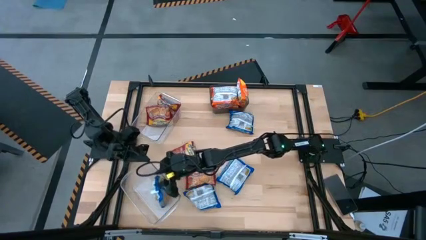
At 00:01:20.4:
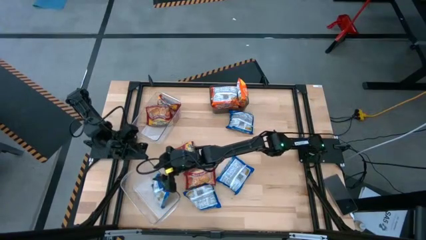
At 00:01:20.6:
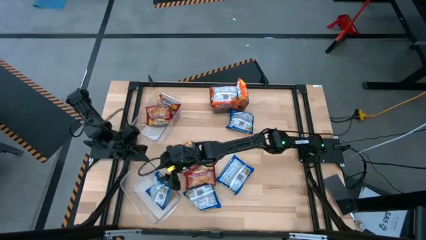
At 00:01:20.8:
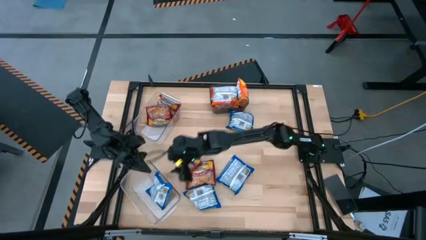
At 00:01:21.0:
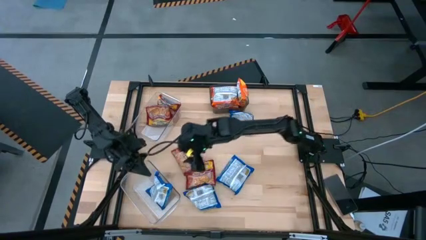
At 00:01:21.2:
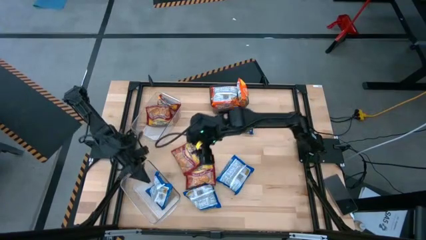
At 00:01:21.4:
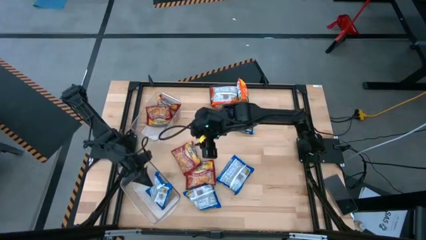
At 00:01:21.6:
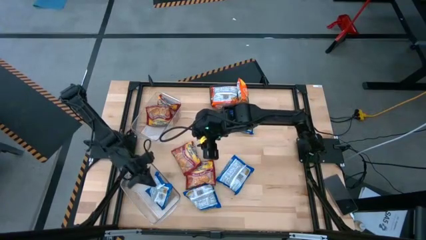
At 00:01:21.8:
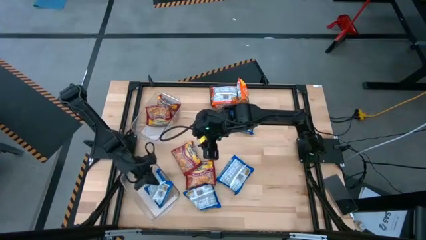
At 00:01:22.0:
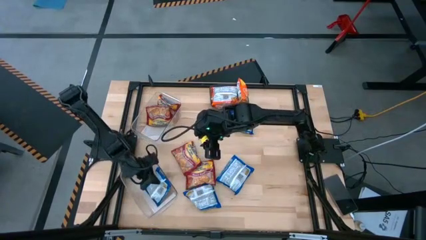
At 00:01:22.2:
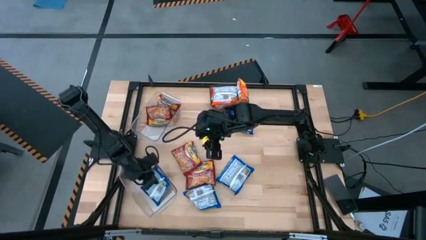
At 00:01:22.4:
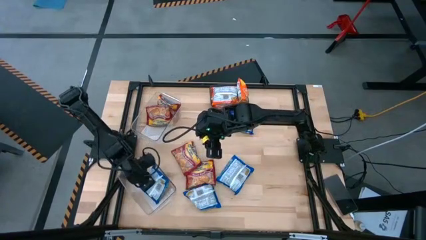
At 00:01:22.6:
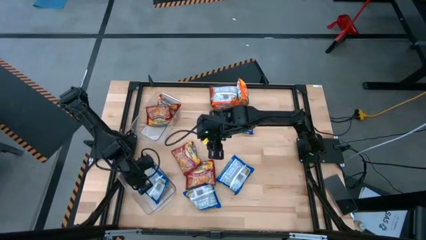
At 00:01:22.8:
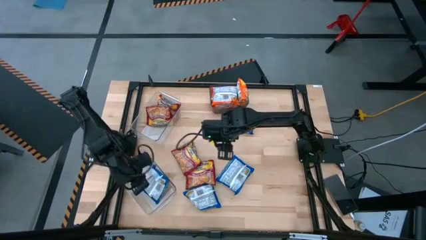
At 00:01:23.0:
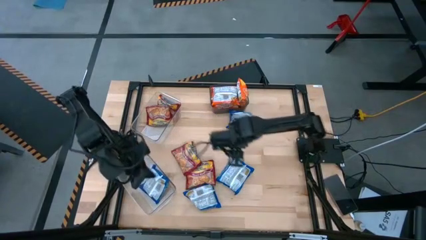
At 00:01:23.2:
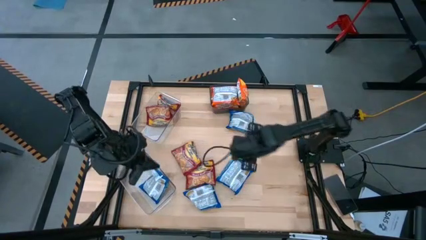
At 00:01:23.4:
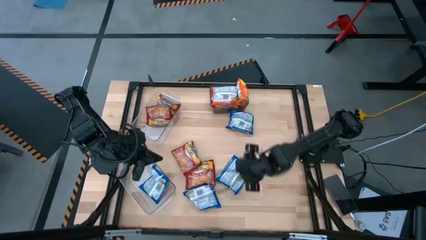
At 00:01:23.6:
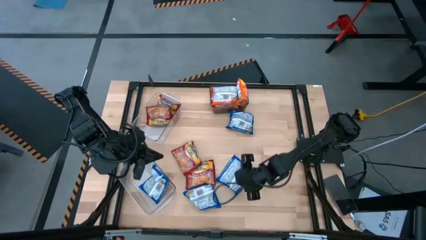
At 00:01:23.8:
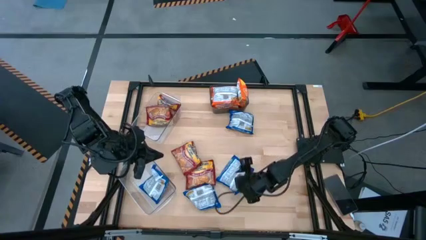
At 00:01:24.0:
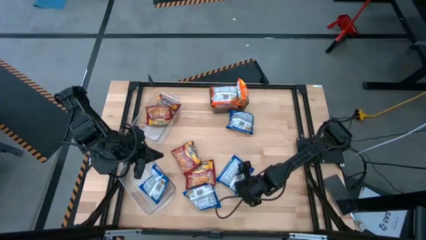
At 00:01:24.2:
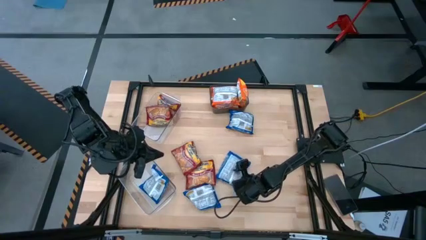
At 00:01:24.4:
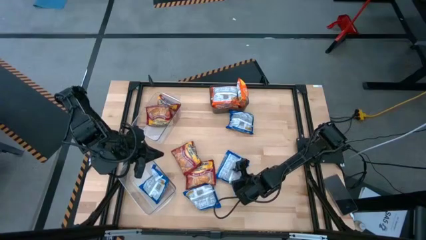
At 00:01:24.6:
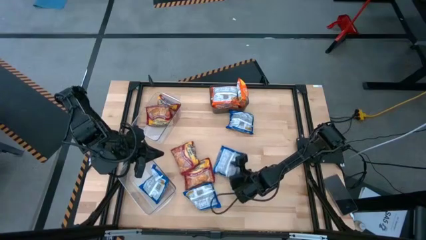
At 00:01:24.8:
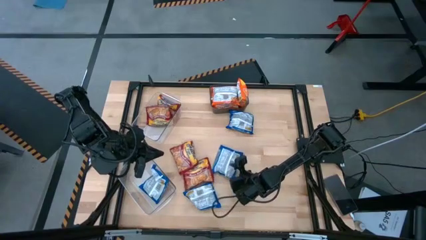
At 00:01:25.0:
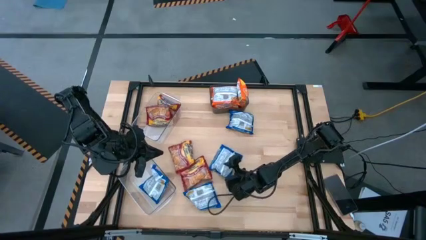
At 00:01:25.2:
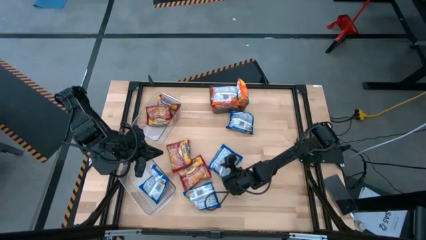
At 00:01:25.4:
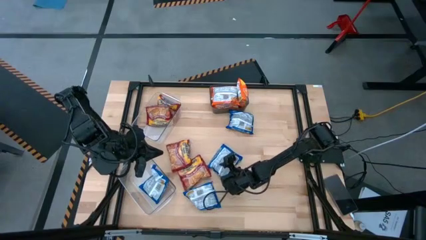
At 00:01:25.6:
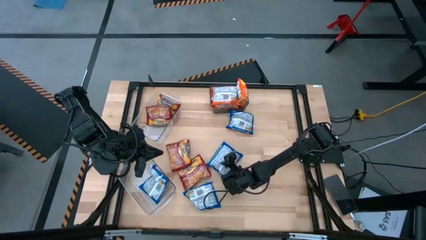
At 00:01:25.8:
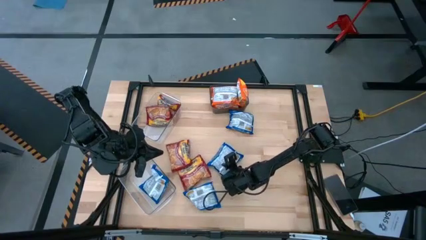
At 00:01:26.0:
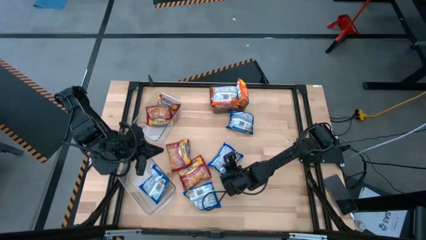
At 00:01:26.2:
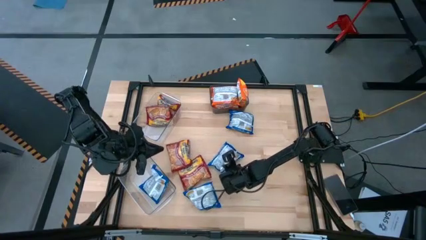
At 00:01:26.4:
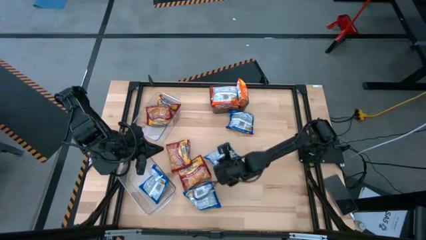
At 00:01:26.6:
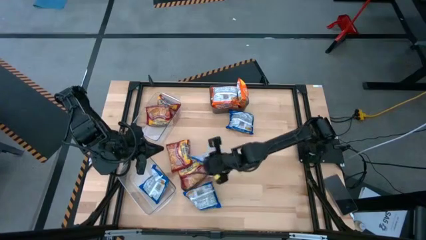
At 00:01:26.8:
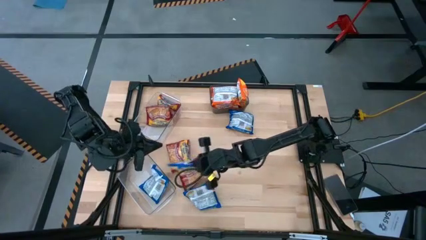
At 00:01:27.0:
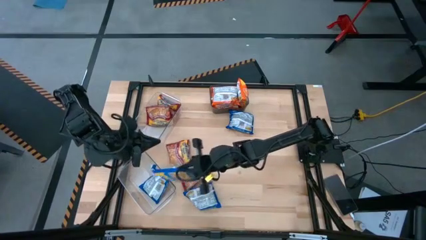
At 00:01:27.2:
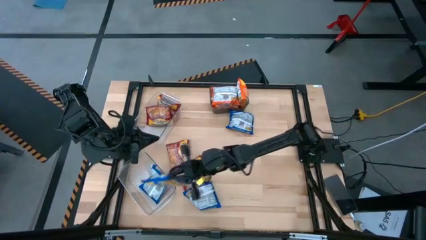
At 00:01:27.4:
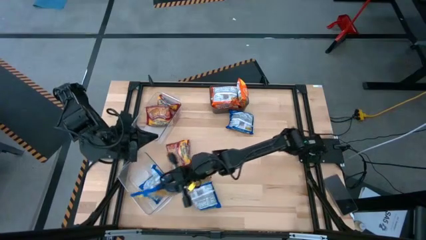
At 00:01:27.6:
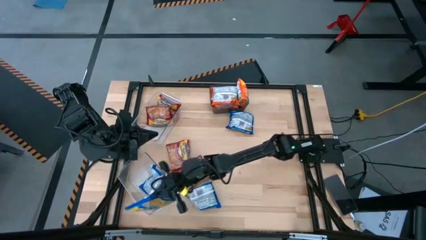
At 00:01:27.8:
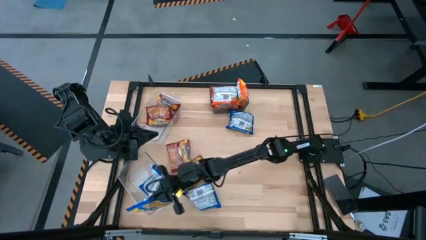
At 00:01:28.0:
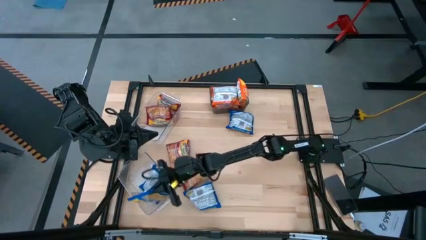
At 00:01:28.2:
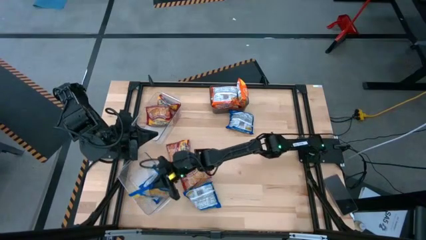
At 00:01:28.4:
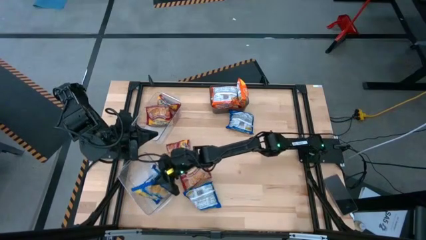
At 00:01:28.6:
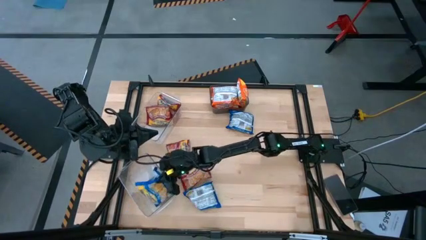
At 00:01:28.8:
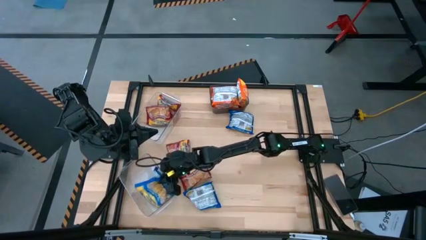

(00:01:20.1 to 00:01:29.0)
Task: Sort Maruchan noodles
Put the middle blue noodle pack into the bottom transparent bin

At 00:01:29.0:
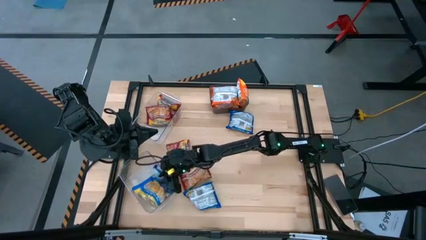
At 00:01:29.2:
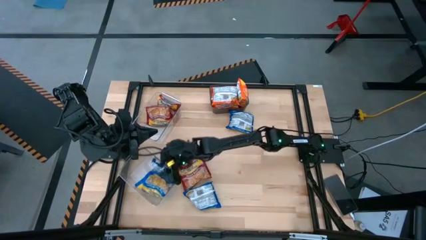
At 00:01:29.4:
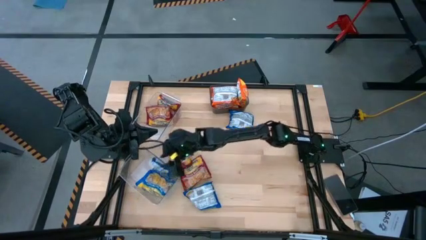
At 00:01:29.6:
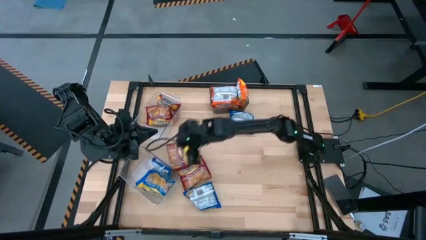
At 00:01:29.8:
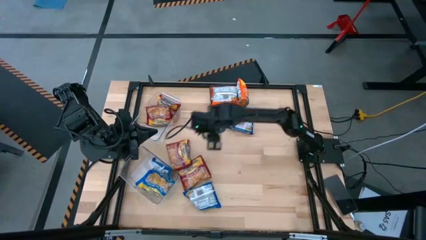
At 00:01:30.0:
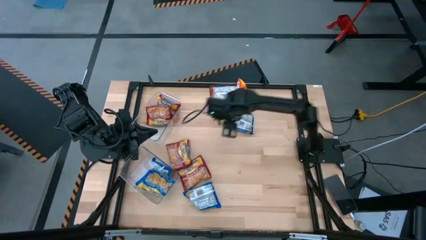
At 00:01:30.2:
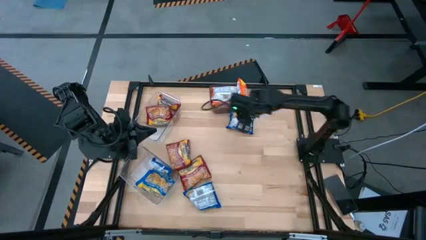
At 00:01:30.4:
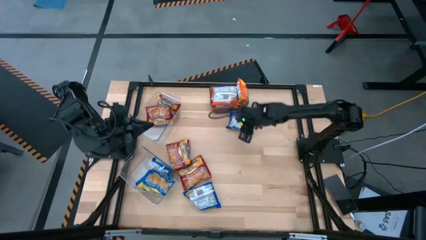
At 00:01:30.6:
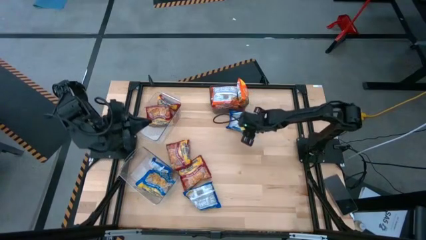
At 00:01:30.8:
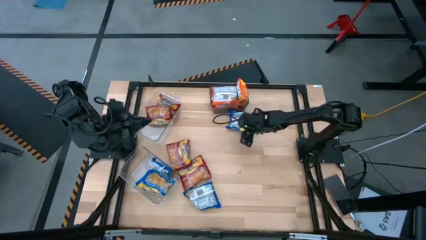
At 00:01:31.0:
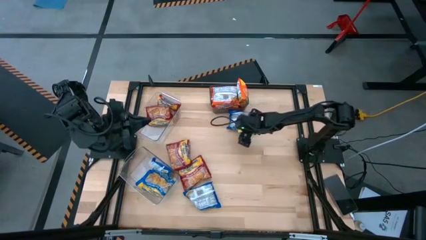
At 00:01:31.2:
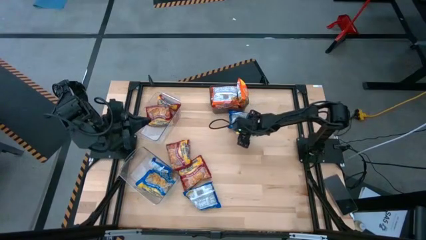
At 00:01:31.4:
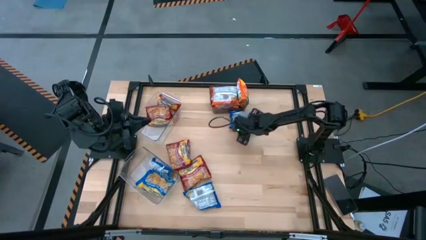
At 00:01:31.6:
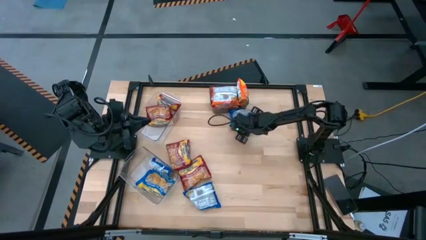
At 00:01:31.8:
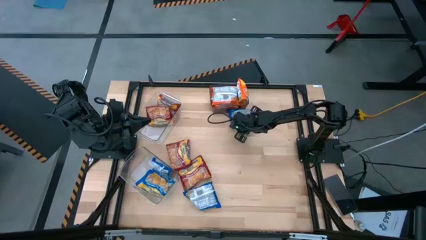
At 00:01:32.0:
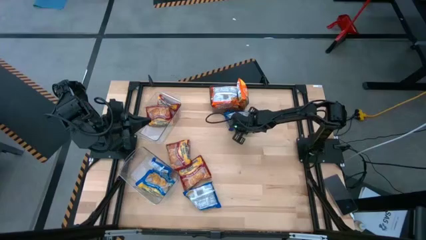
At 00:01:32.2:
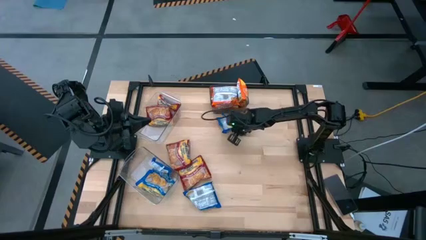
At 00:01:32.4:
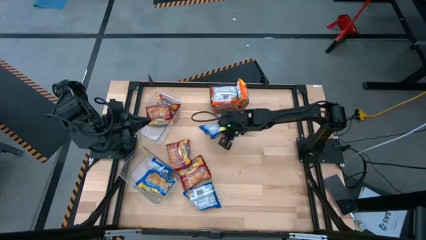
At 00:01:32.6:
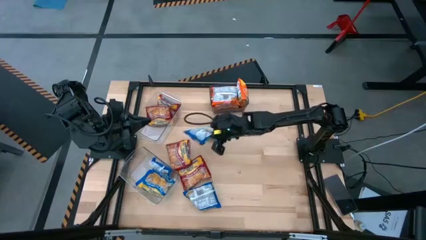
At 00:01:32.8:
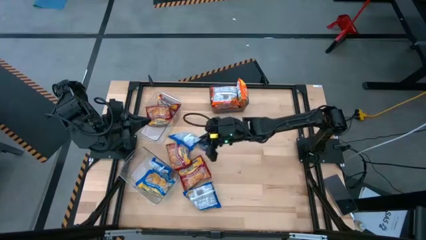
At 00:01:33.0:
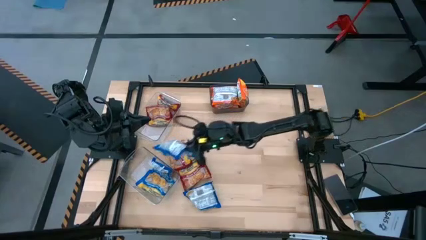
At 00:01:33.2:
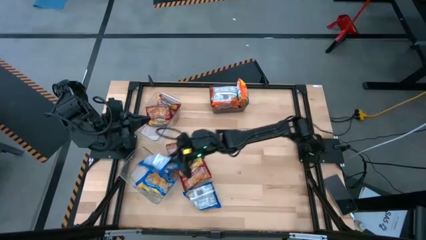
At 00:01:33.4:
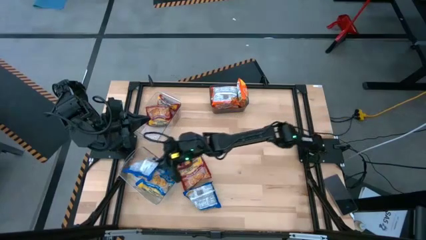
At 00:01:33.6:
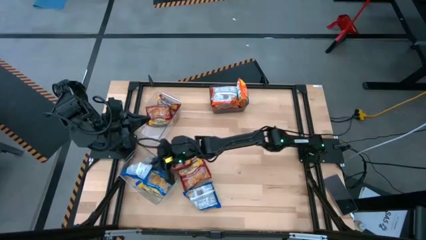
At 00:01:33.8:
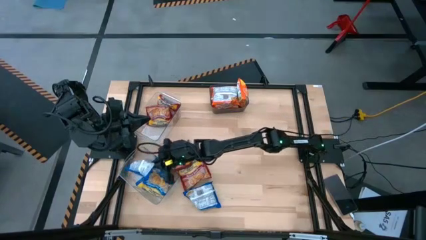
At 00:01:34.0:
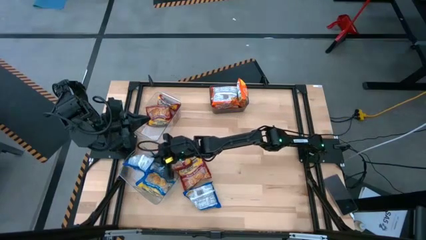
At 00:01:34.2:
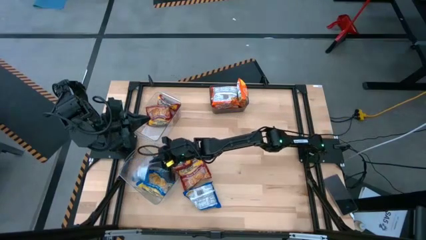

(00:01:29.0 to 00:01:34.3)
Put the top blue noodle pack into the bottom transparent bin

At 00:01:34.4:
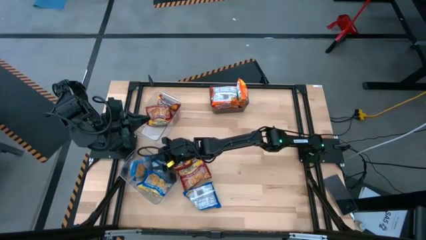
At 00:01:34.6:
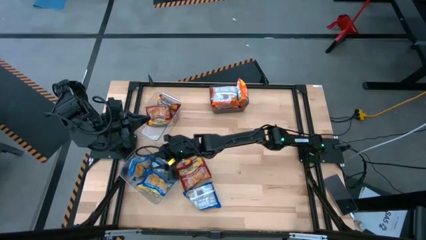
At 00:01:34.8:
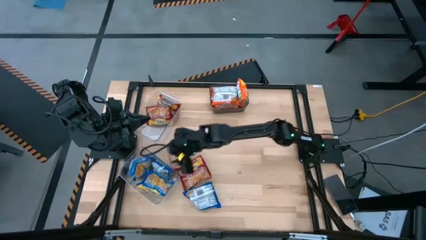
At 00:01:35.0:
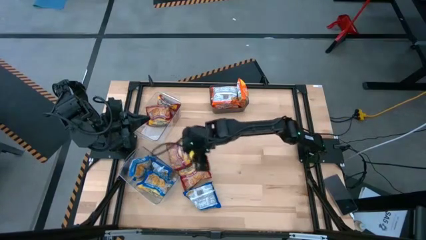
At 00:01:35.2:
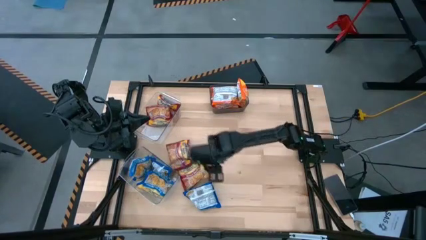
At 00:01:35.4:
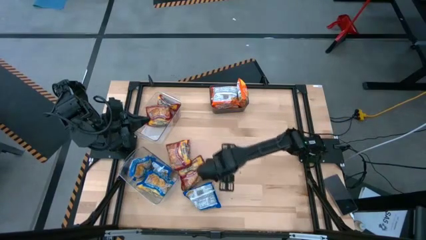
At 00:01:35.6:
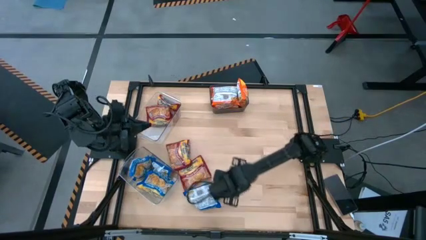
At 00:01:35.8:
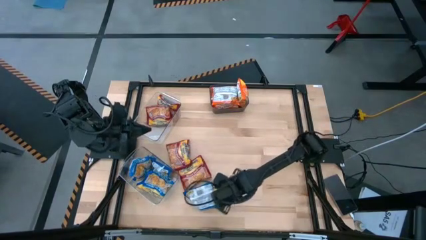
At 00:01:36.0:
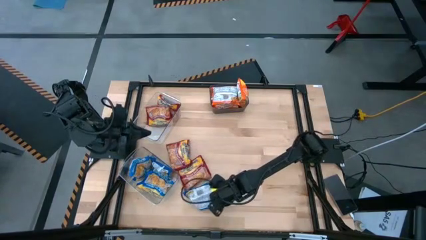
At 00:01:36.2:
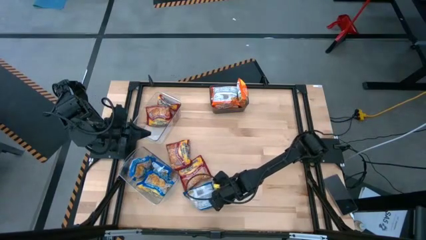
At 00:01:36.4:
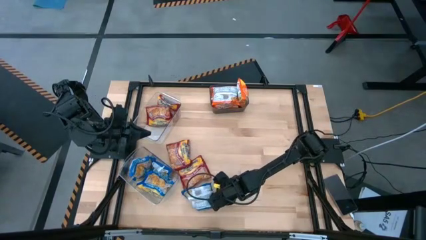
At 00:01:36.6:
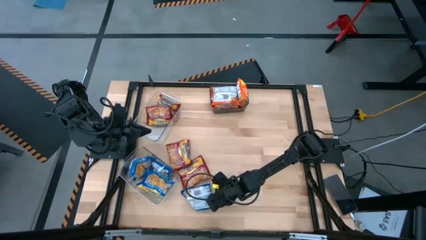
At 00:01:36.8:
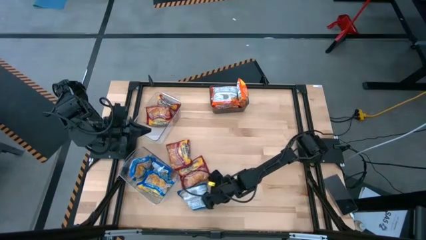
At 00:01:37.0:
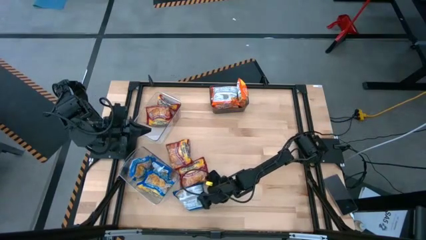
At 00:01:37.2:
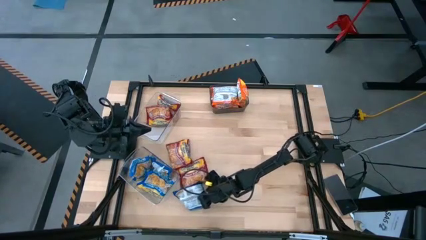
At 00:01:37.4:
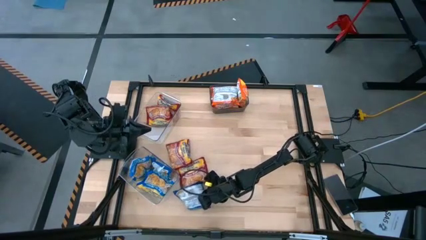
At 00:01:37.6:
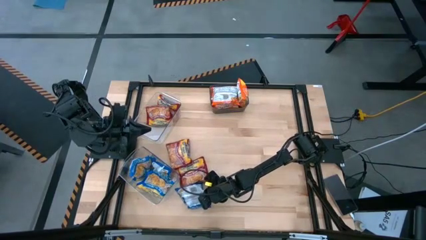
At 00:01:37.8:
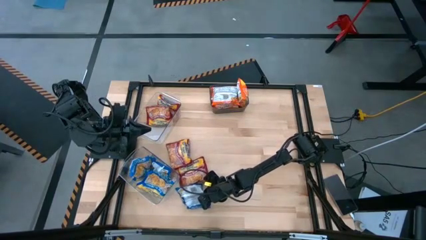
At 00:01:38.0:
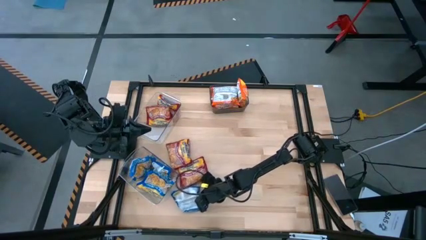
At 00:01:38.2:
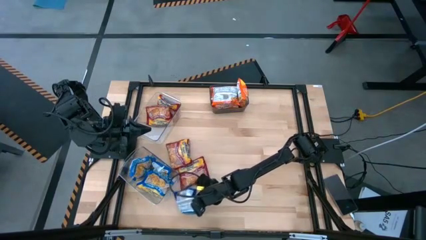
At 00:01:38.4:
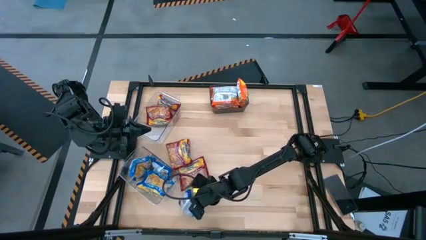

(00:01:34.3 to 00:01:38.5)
Put the blue noodle pack into the bottom transparent bin
